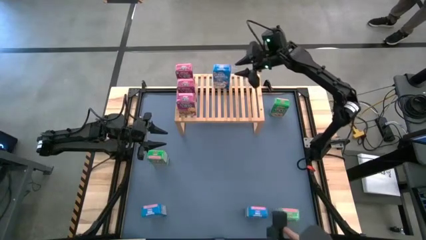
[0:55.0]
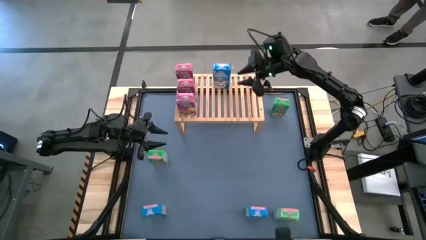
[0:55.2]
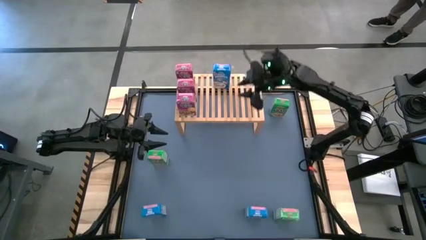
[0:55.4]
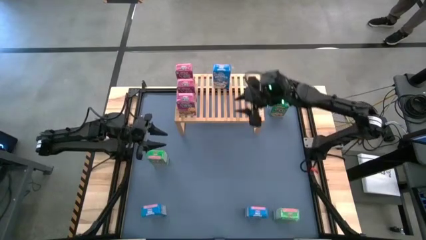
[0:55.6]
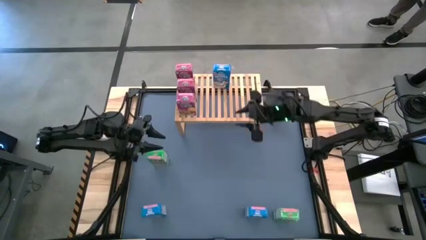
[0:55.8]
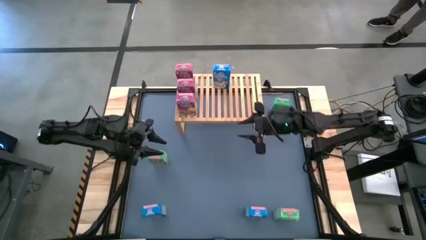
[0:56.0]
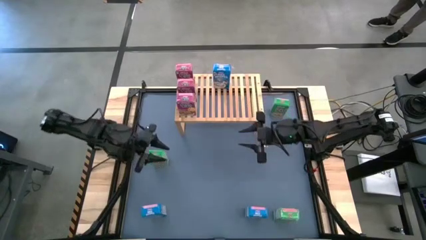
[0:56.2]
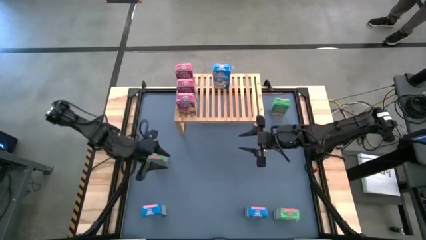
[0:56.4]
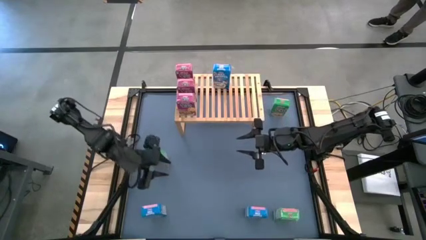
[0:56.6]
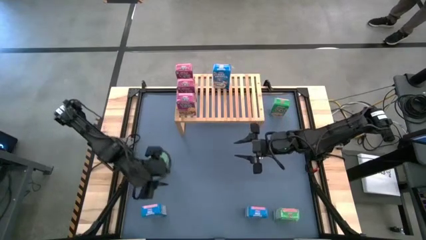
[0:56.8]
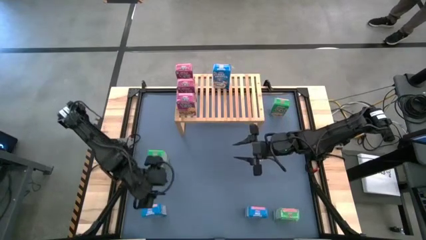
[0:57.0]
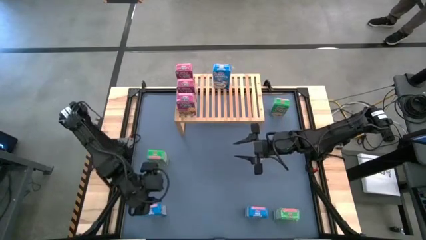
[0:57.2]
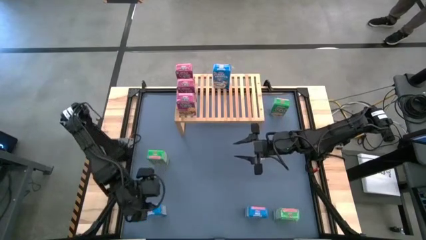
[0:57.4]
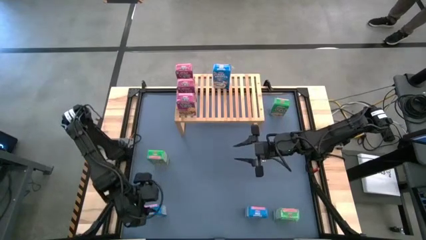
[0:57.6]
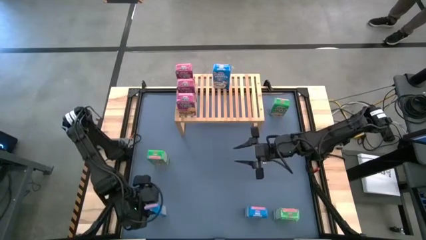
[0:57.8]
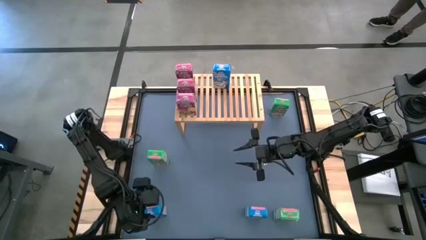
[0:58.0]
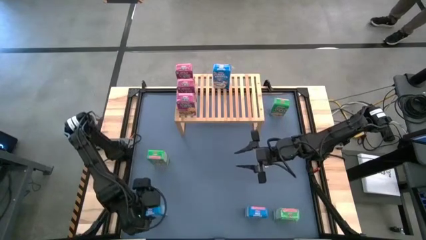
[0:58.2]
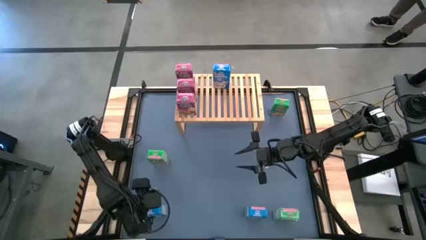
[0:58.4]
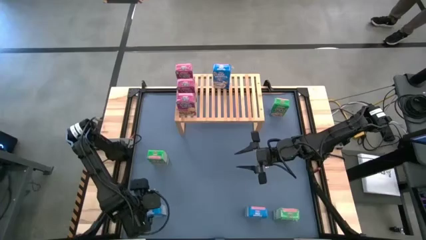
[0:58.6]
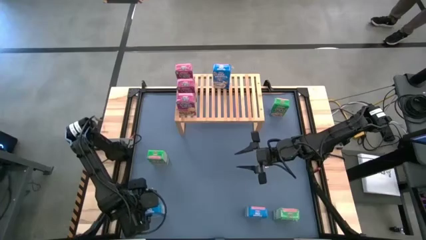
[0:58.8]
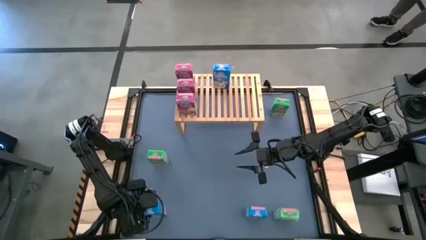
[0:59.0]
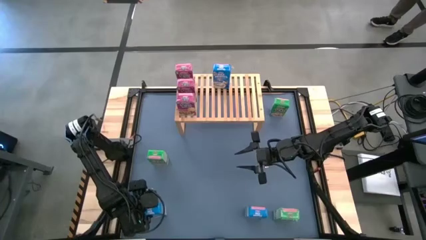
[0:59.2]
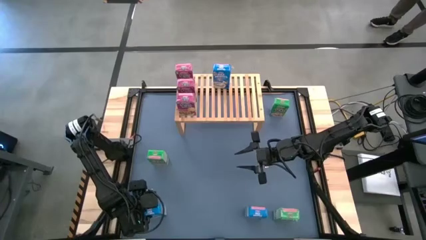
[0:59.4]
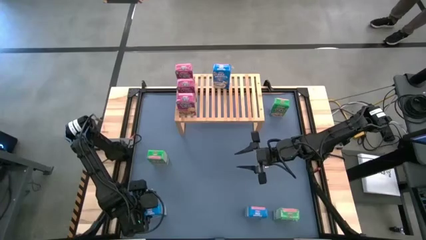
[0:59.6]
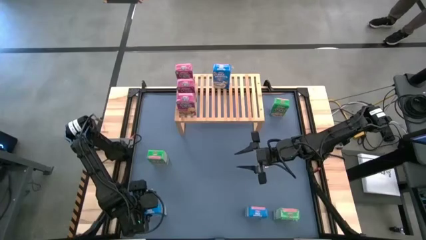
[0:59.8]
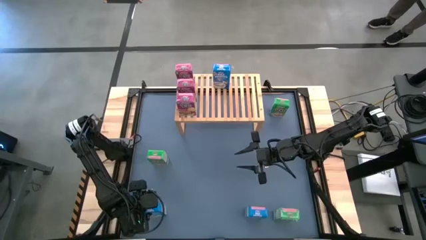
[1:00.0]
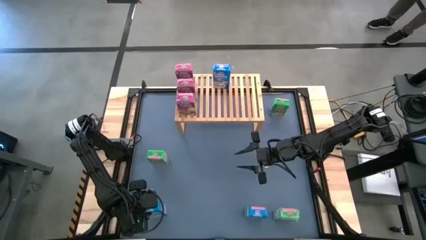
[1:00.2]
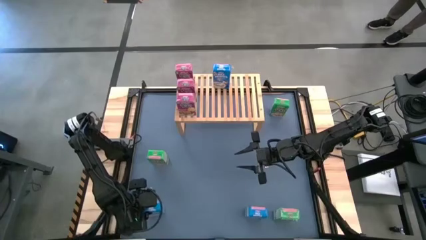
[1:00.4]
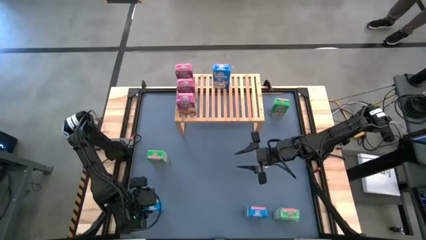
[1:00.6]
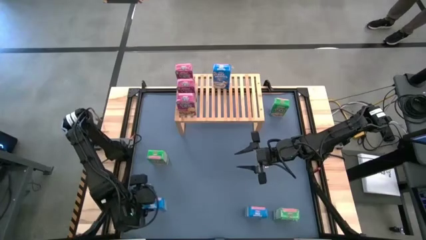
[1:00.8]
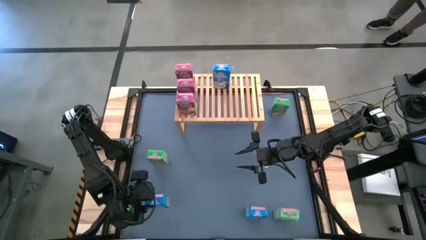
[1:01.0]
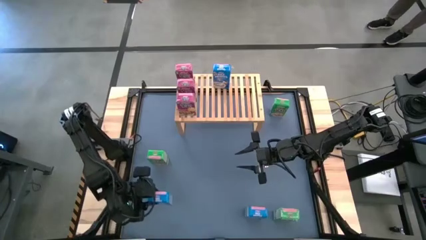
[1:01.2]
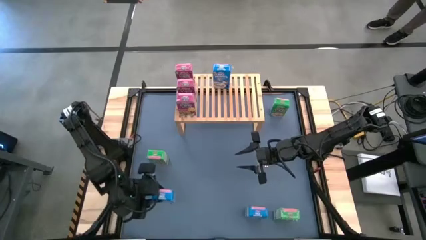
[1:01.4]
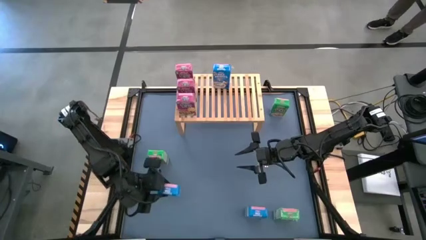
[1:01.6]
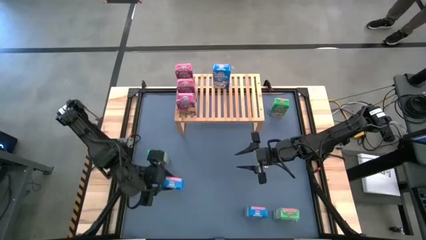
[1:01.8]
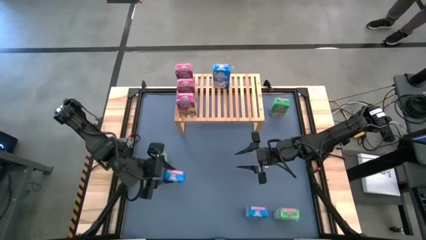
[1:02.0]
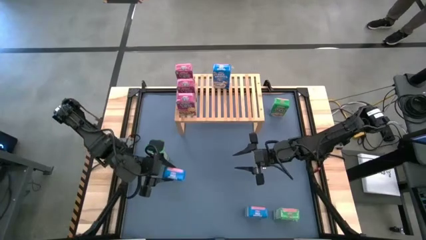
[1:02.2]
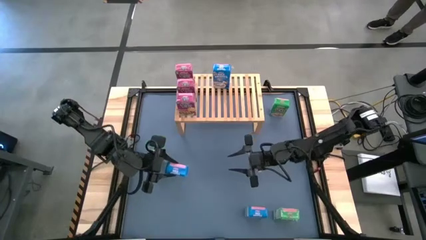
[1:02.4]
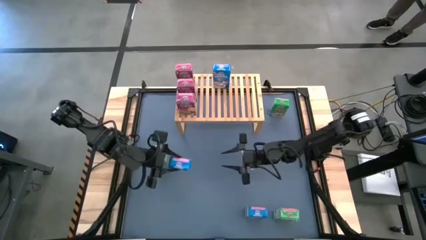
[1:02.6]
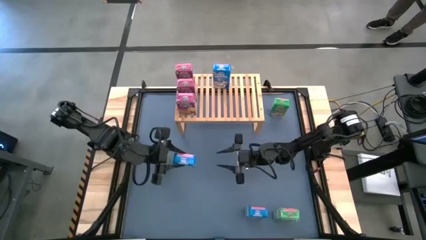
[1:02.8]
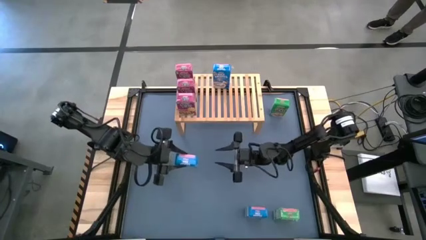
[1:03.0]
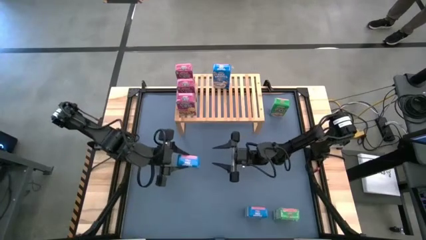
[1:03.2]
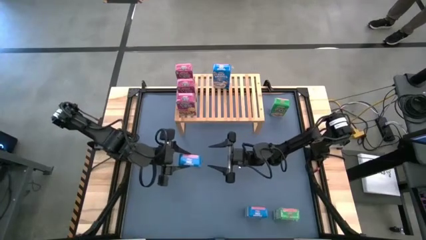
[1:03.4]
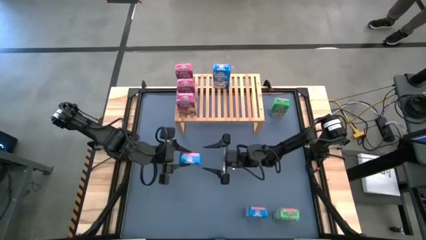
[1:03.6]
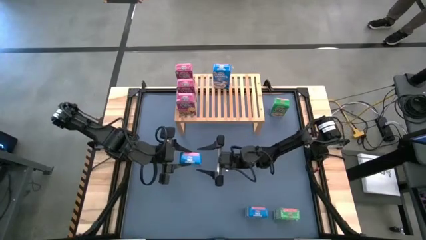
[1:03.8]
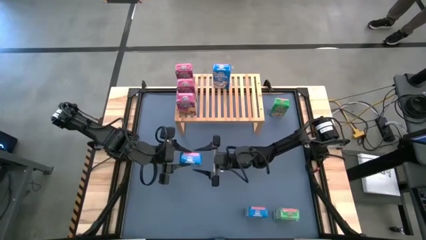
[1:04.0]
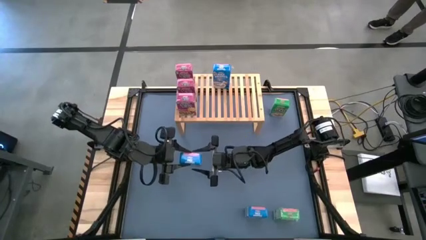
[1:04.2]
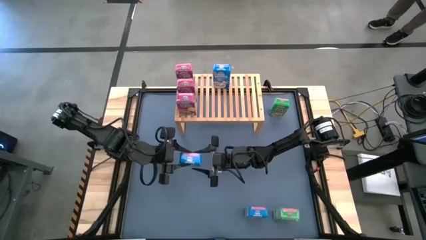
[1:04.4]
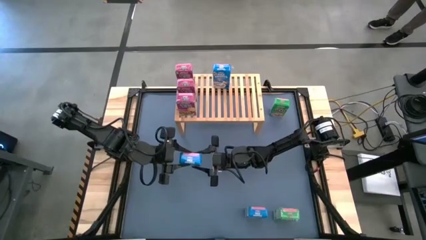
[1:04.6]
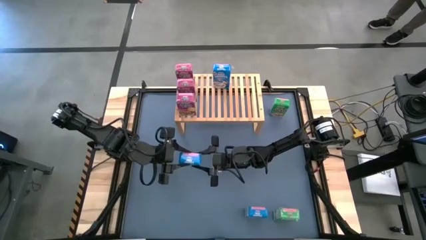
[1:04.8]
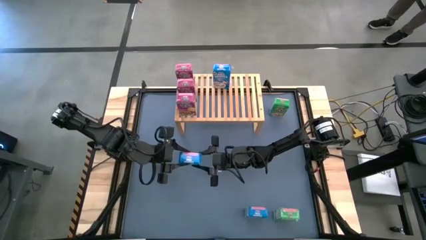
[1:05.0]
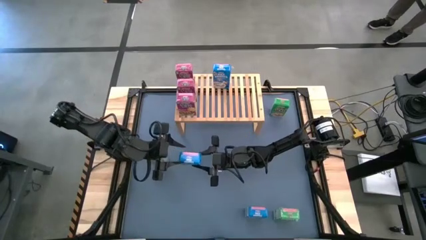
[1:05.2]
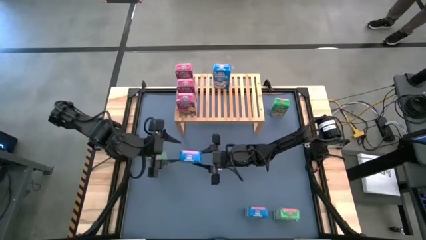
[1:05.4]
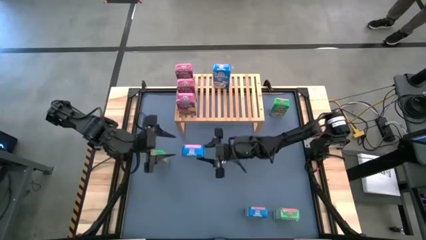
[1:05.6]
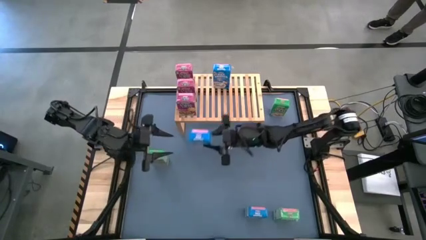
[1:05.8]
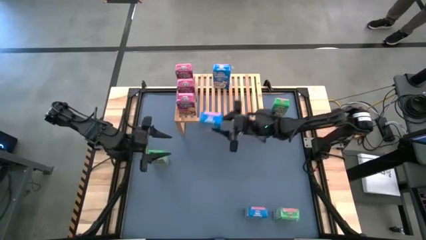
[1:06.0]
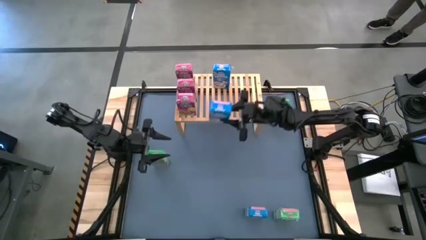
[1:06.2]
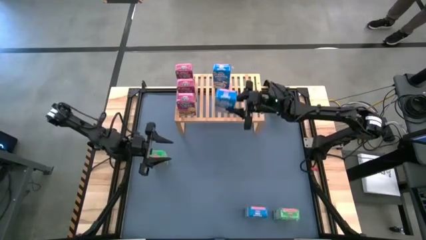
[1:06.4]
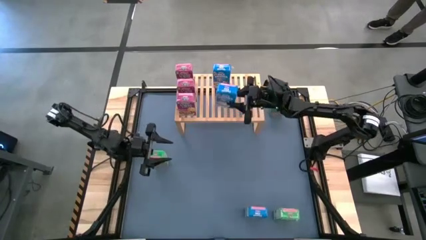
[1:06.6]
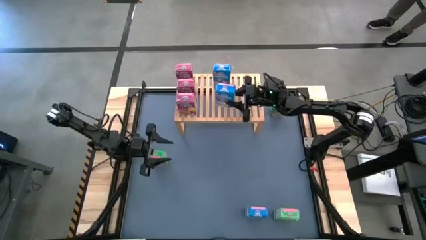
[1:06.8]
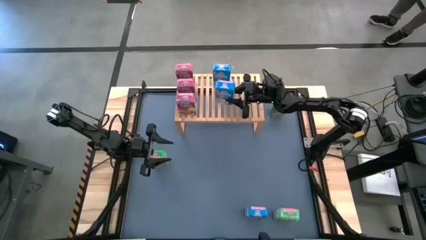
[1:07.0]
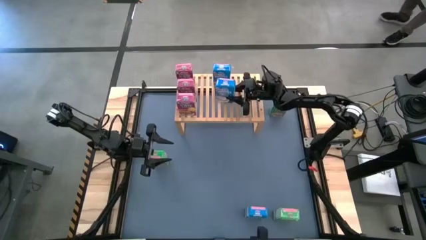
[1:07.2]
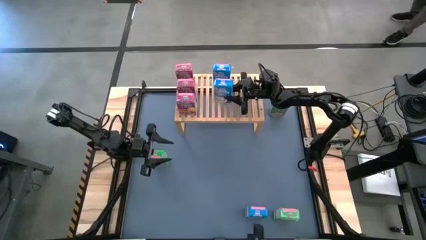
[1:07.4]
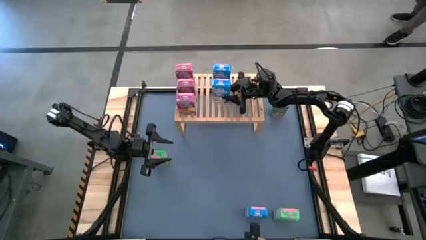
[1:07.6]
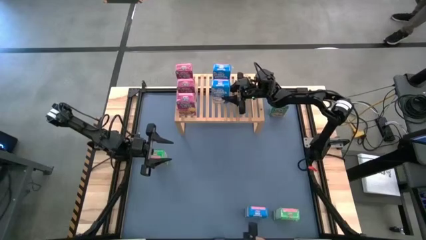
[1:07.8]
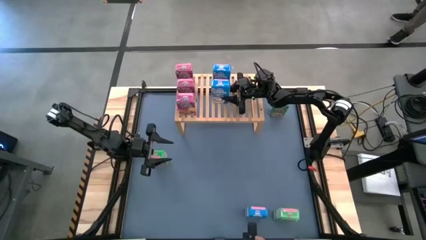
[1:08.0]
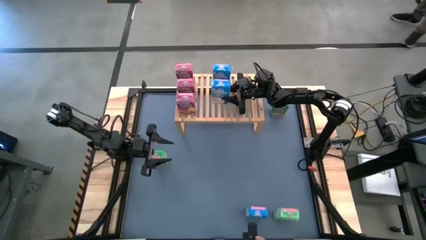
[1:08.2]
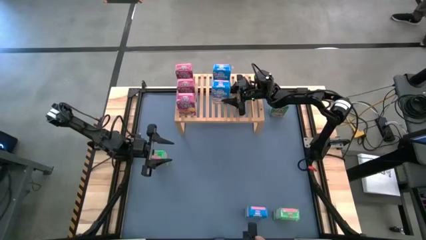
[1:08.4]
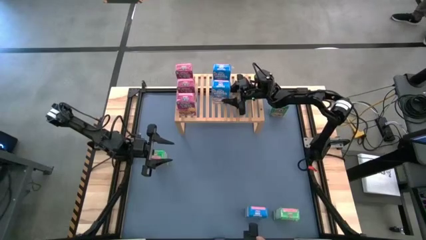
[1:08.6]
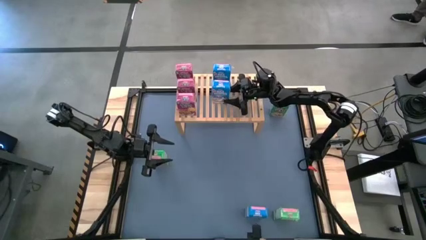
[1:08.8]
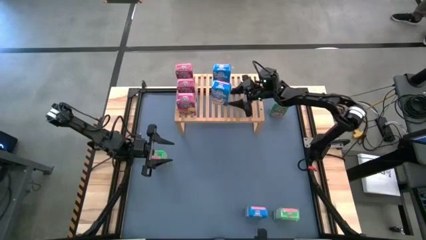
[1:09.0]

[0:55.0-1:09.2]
Task: Stack cereal on shelf
Put the left blue cereal box on the shelf aligned with the other blue cereal box

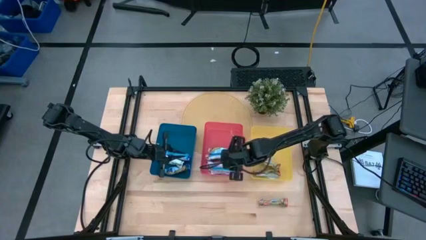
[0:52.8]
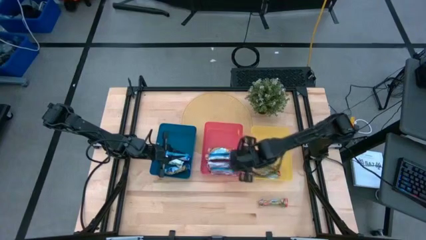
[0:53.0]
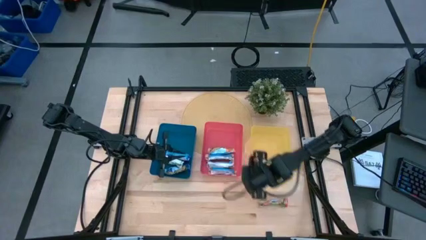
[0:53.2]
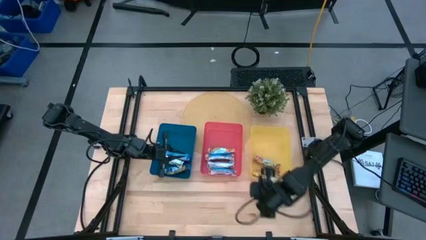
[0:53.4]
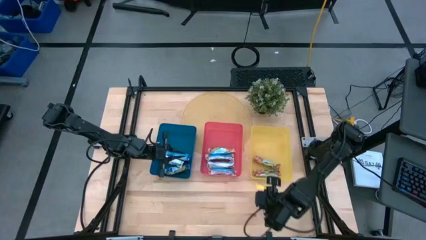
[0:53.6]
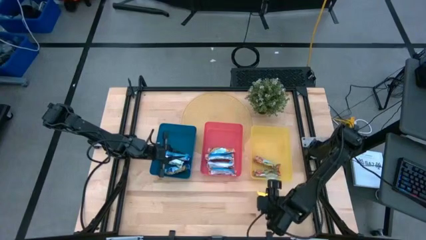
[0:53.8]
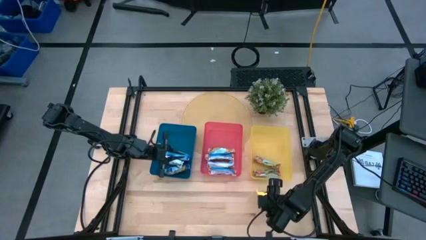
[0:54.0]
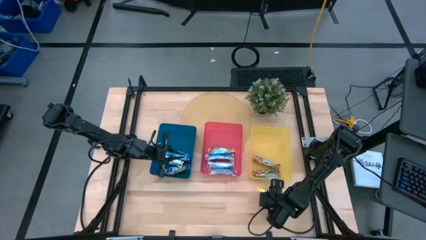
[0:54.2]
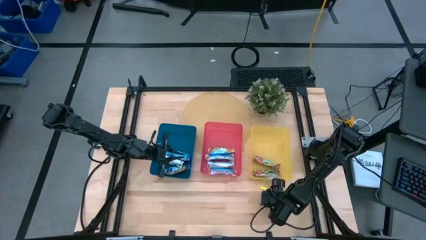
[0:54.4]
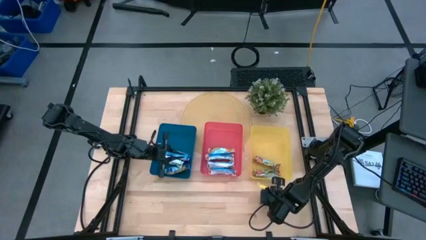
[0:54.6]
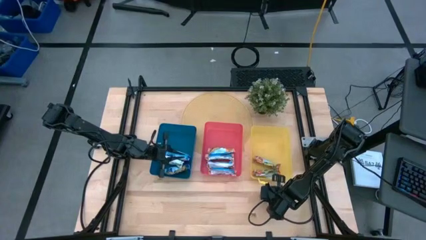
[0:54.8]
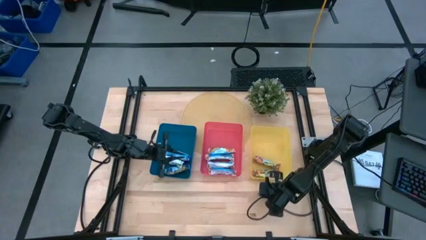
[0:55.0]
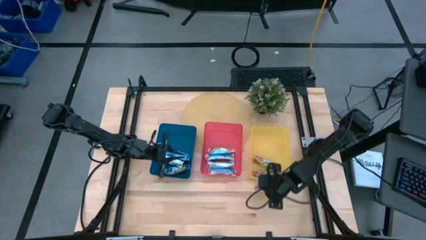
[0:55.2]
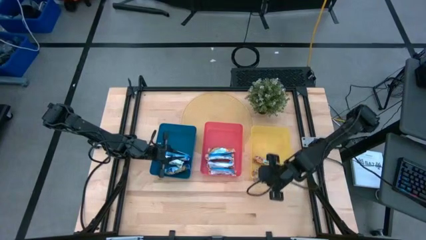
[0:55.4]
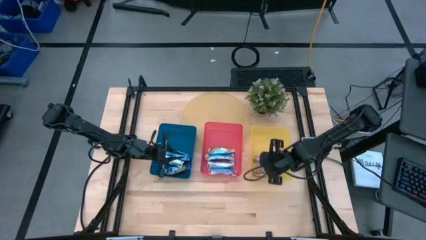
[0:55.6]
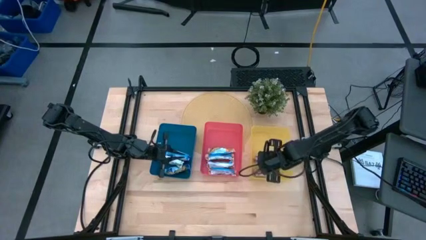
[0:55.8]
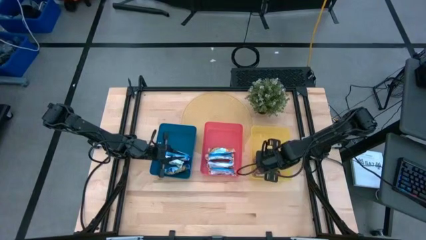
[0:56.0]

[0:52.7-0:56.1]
Task: Pick and place Granola Bars by type
Put the red granola bar into the yellow bin
